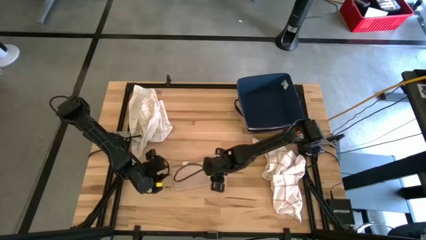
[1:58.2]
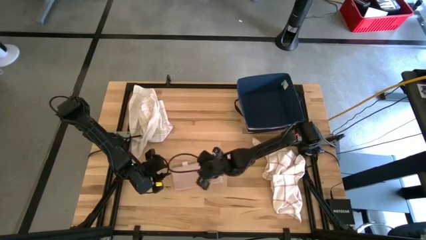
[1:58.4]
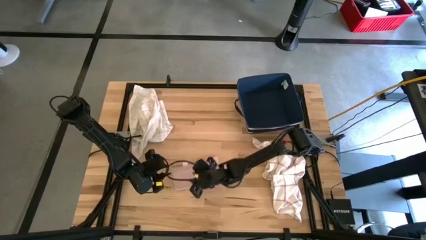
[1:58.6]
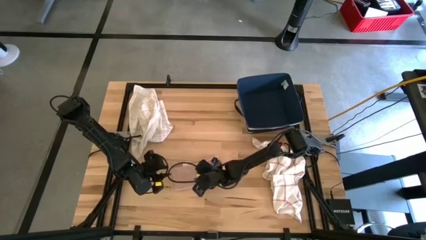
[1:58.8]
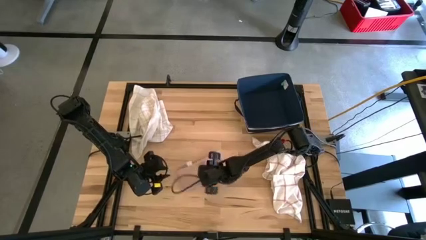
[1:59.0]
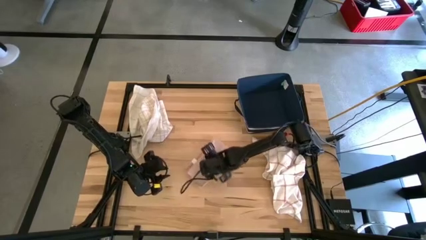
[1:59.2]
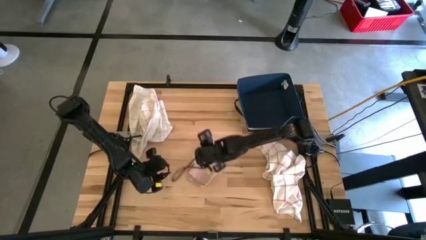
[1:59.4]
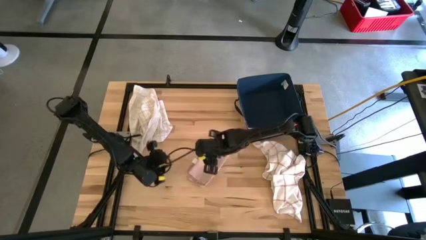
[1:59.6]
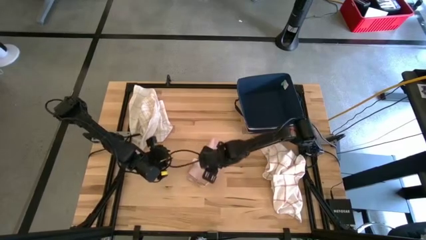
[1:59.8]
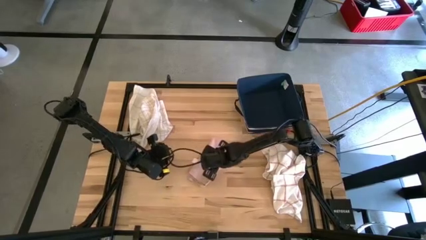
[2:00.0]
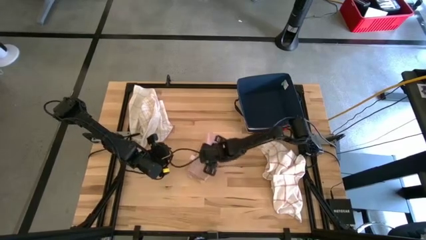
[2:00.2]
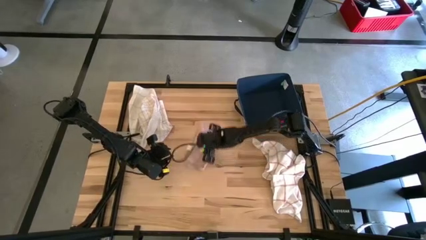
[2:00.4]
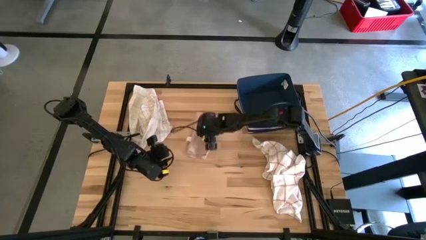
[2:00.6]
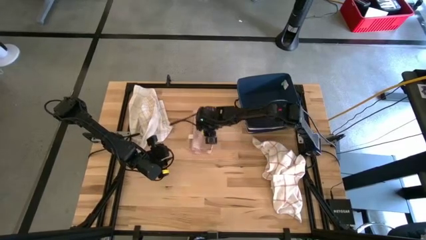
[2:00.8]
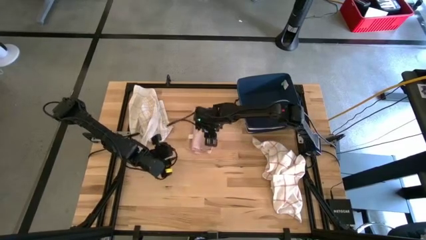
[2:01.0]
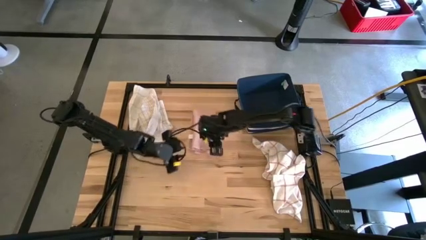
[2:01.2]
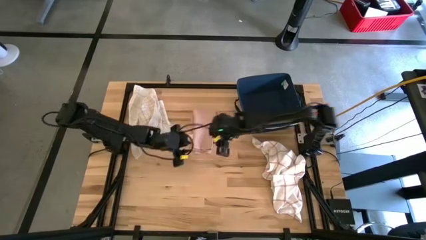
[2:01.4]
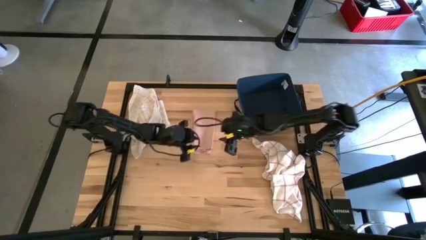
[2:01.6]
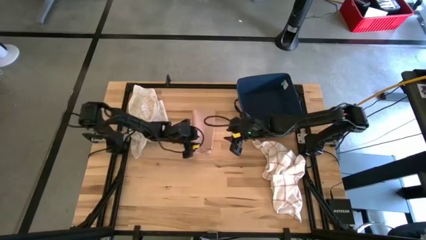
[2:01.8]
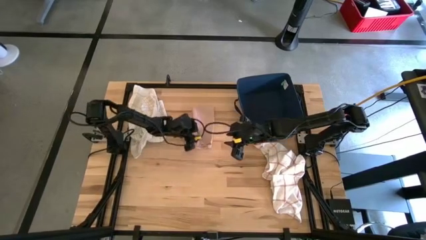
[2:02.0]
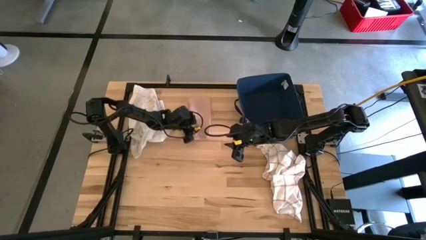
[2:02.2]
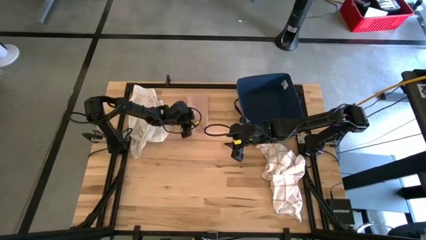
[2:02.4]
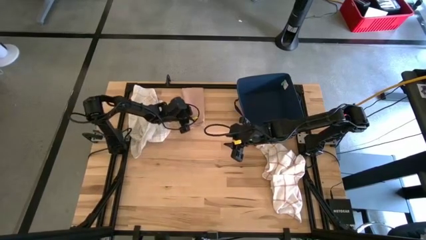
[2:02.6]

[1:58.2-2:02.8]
Task: Fold towel
Move the pink towel to the top

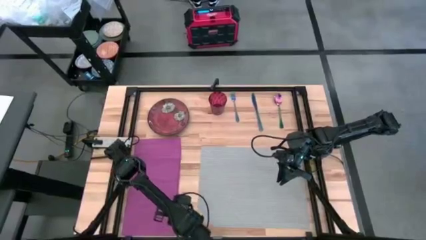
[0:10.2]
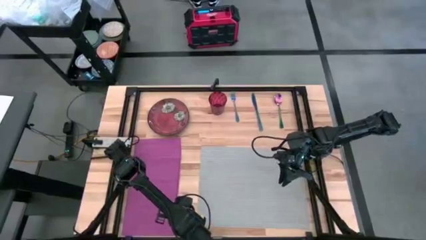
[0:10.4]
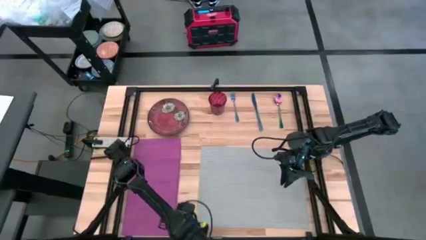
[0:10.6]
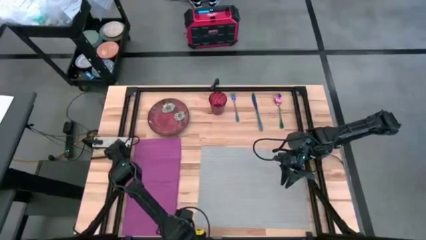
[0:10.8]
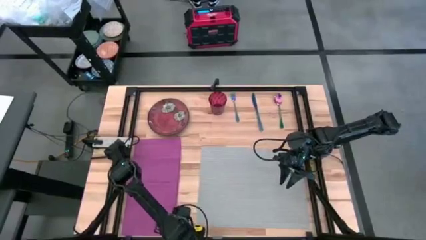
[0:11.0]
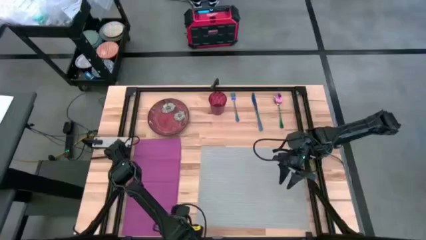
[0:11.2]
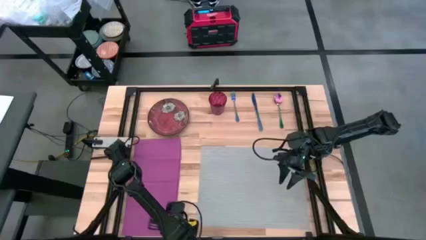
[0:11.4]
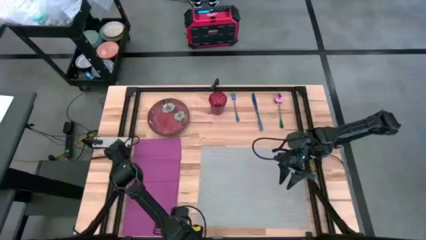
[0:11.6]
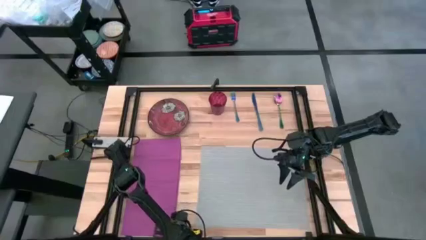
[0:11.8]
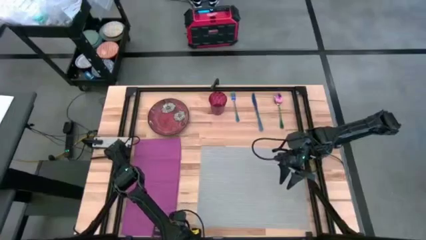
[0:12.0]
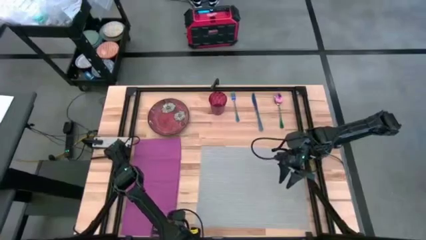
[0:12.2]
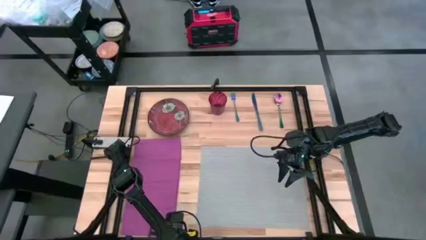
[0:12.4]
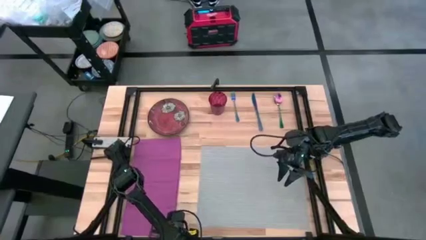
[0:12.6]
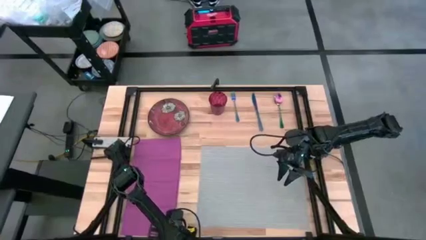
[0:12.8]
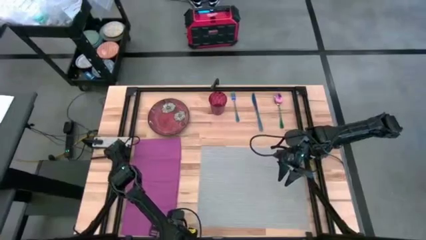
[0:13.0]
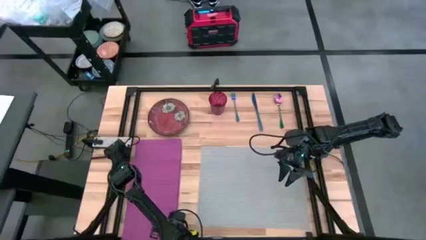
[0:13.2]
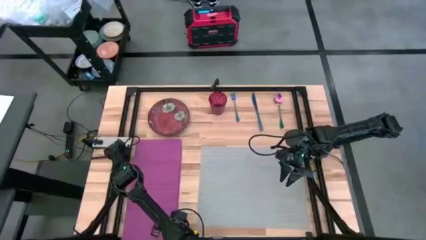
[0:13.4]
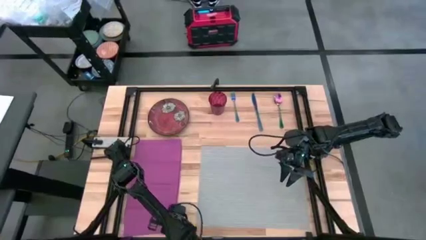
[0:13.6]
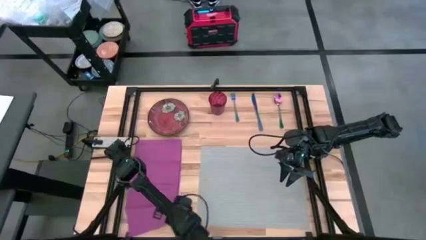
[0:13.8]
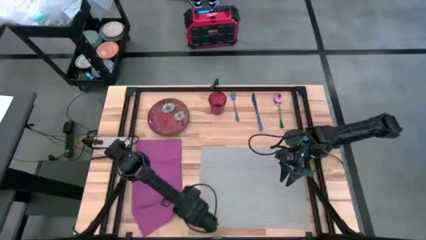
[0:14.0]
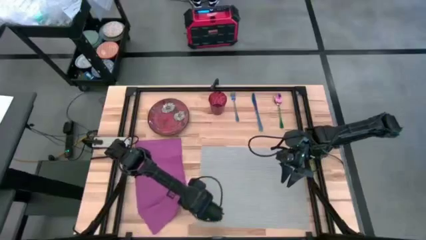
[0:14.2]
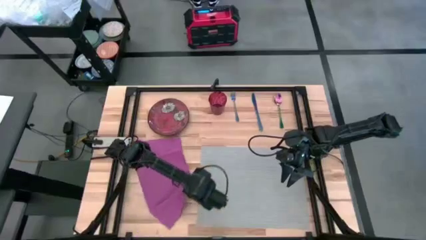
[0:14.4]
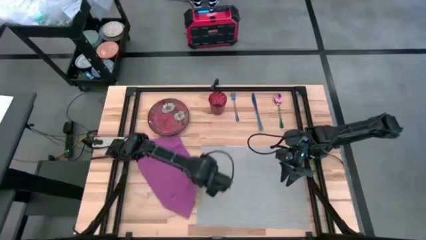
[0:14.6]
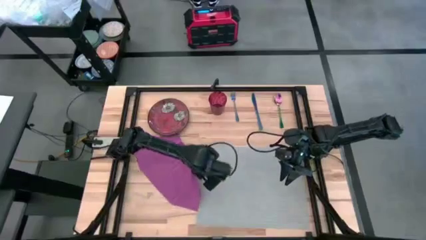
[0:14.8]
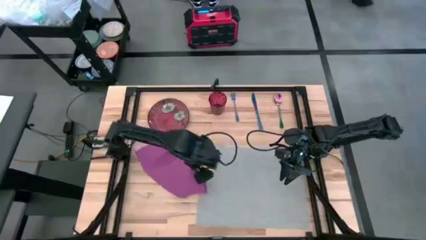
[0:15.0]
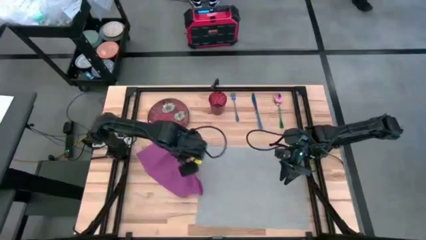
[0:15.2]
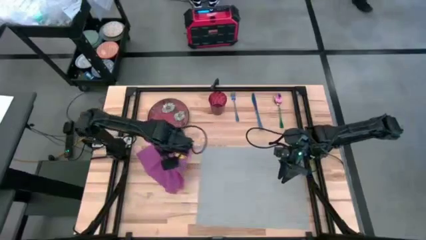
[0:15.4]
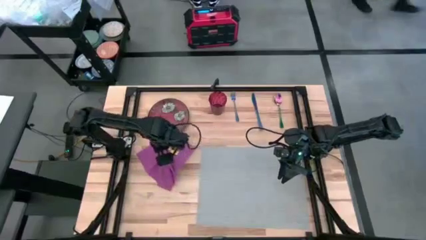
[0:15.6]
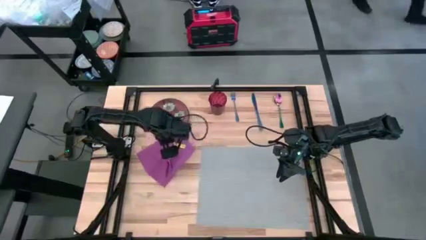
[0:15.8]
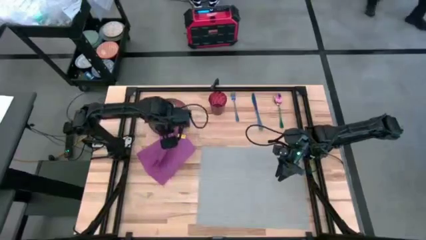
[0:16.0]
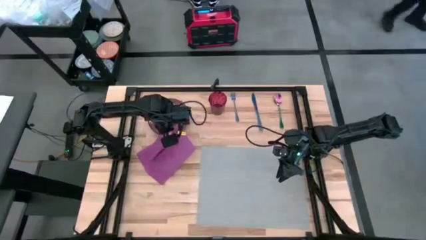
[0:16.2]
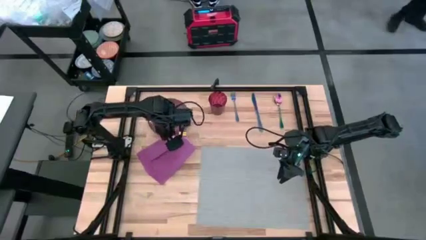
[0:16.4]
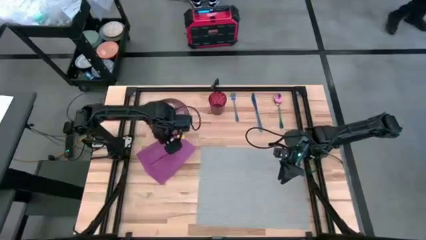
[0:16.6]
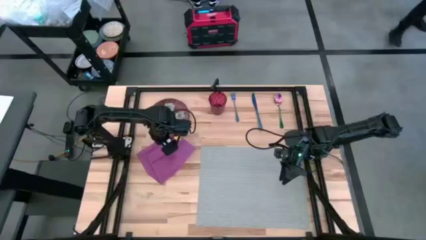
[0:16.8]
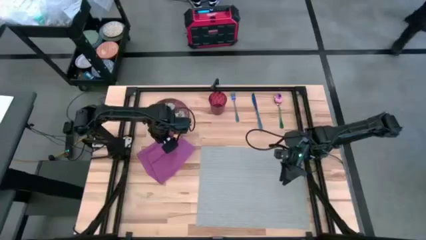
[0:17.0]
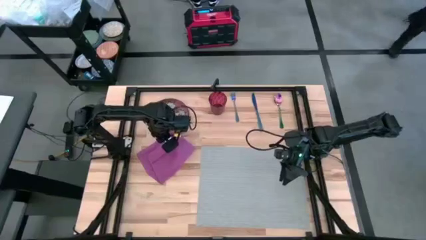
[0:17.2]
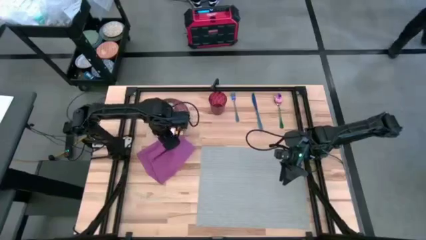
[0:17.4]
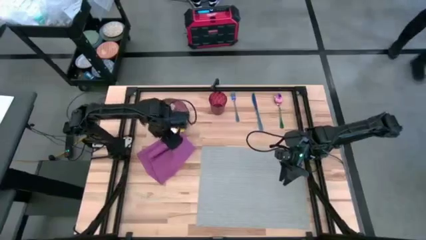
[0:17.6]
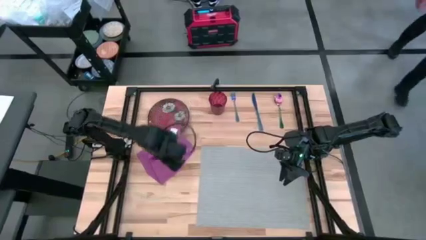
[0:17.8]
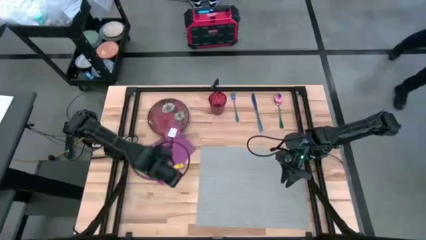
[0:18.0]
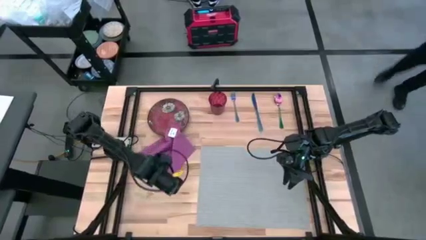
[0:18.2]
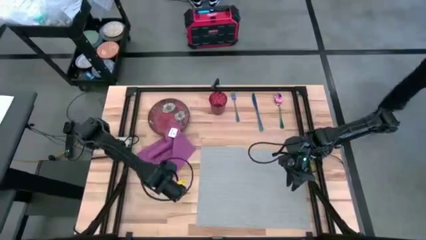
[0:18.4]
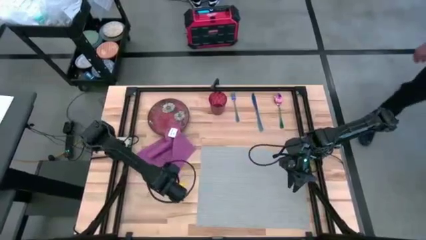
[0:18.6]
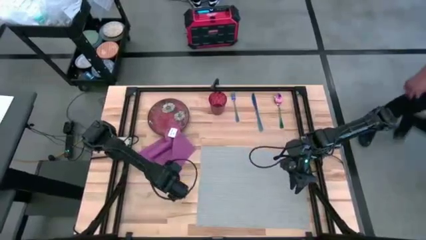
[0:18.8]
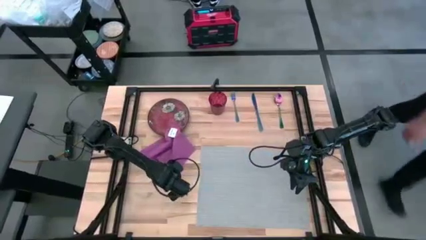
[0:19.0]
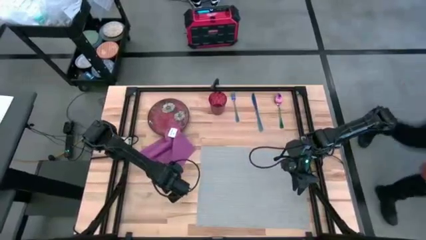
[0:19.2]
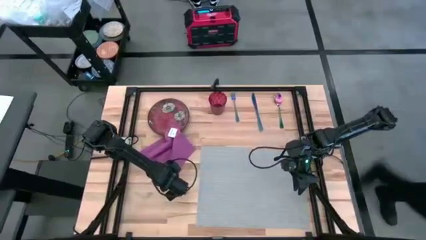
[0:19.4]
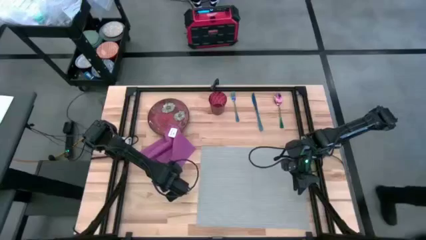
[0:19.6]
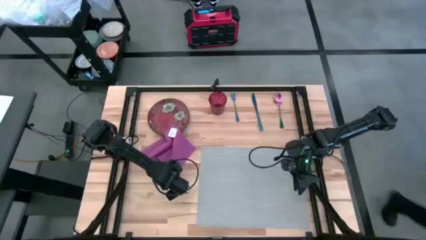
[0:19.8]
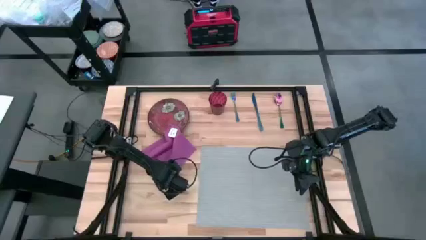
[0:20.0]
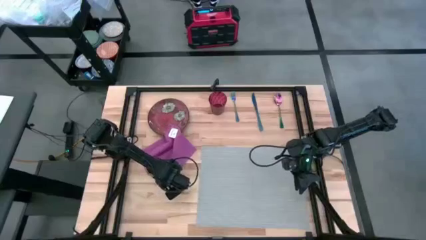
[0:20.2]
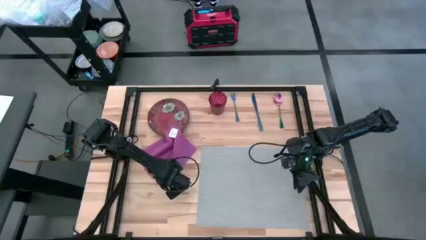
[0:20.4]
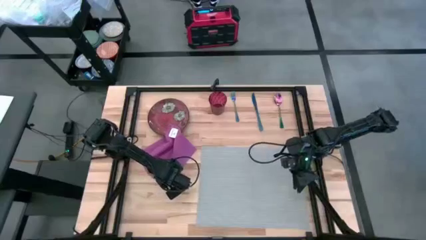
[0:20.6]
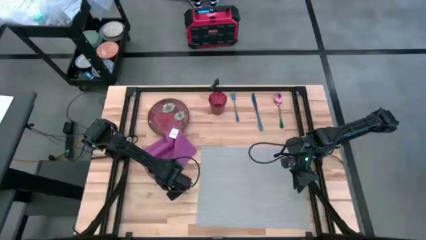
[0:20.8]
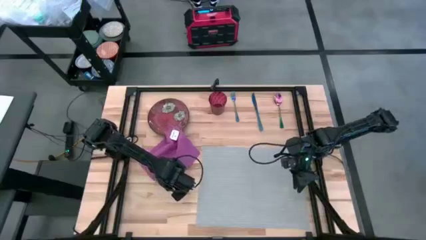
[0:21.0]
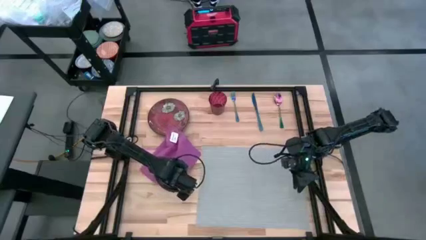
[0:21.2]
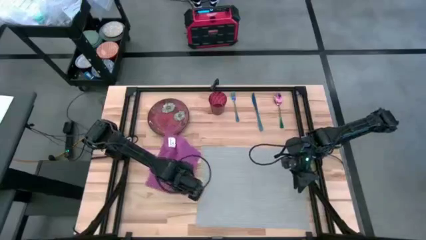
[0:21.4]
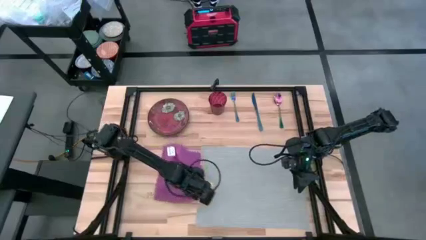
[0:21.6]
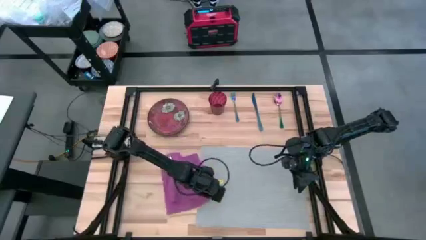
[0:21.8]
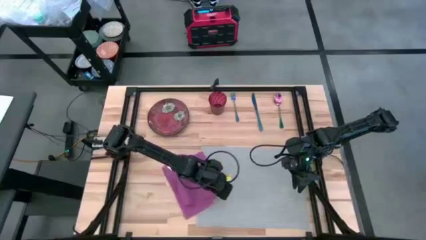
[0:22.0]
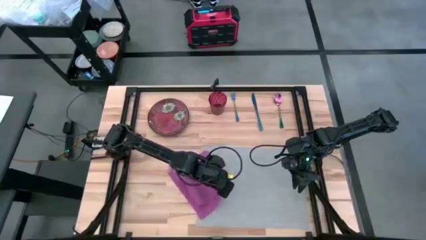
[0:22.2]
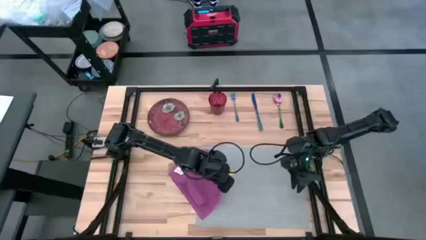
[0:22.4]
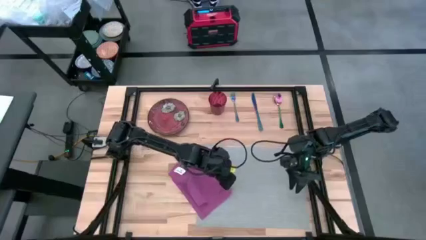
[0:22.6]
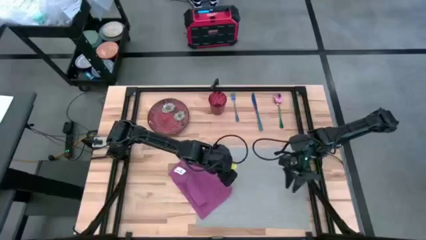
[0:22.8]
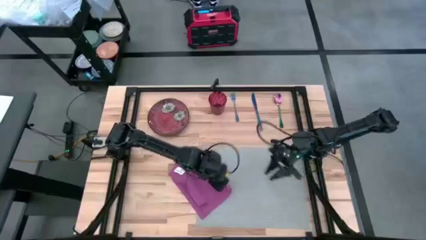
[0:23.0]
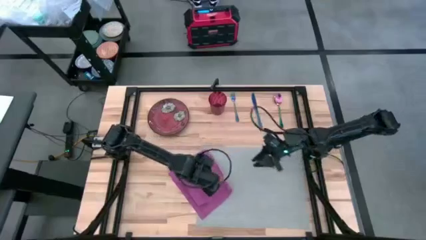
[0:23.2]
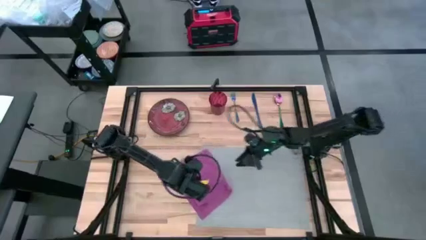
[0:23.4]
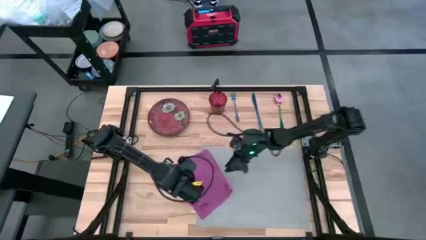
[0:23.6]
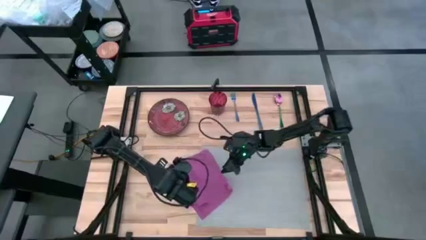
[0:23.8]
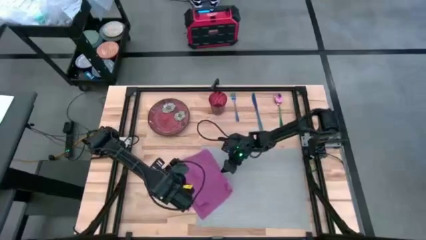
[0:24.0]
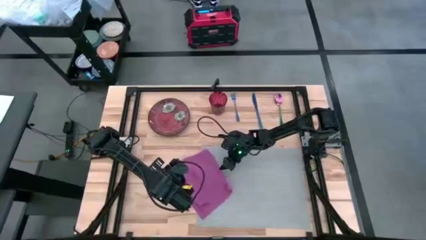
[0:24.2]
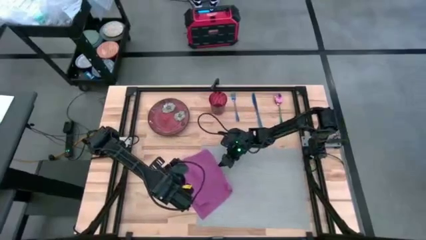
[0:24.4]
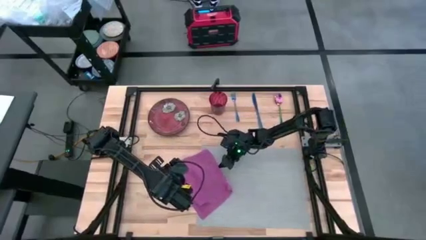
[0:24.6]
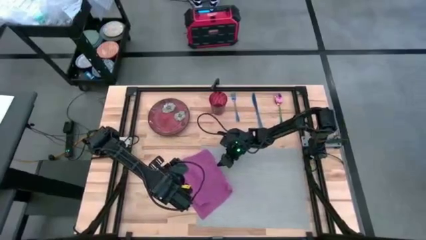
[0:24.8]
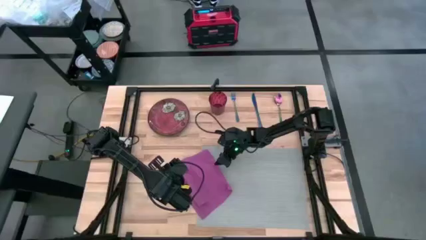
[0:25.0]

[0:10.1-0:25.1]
Task: Set table place
Fold the purple napkin
